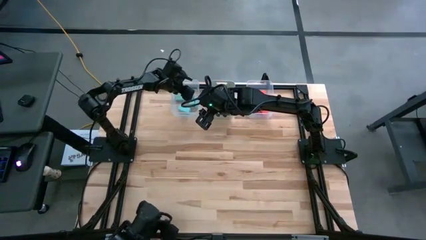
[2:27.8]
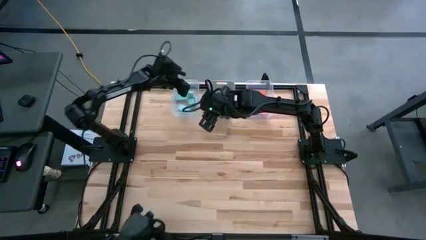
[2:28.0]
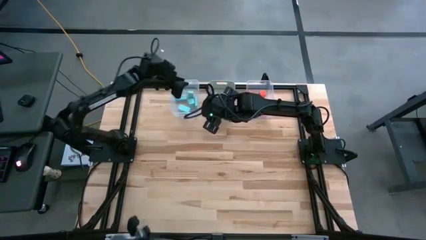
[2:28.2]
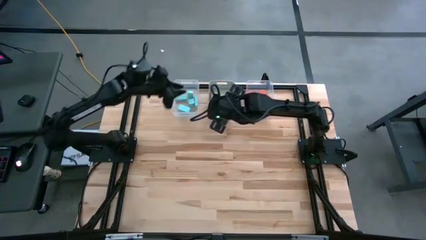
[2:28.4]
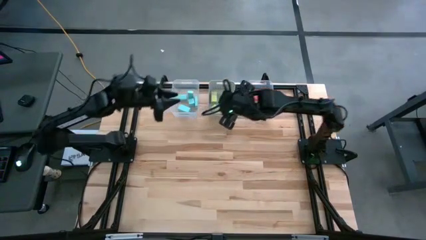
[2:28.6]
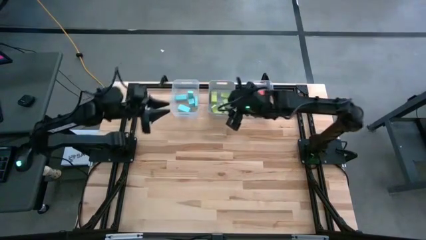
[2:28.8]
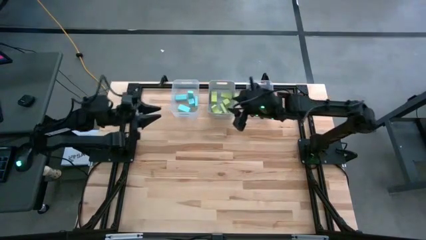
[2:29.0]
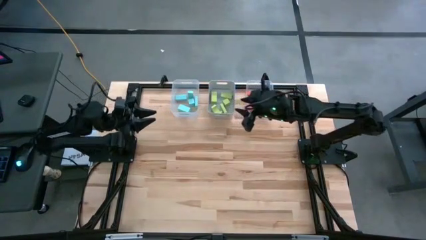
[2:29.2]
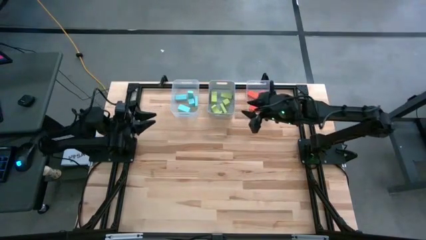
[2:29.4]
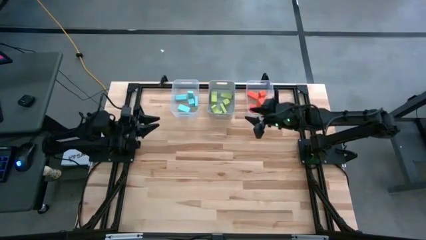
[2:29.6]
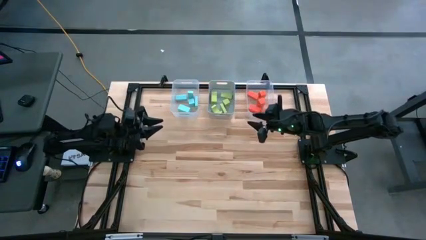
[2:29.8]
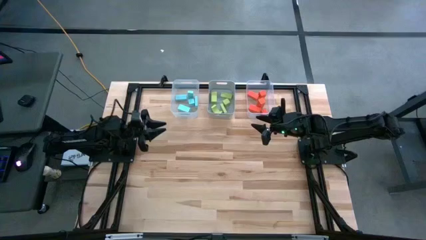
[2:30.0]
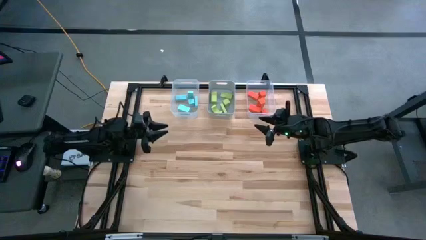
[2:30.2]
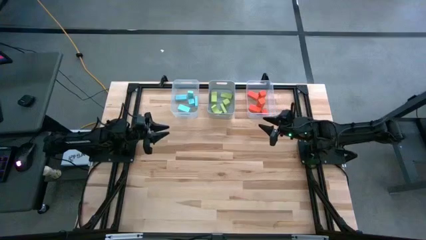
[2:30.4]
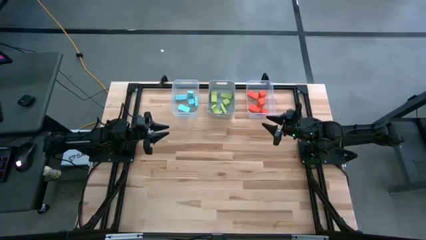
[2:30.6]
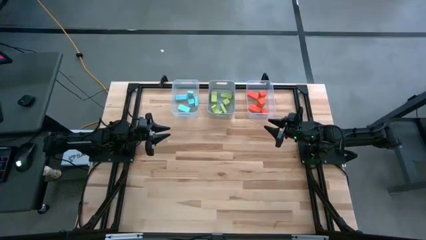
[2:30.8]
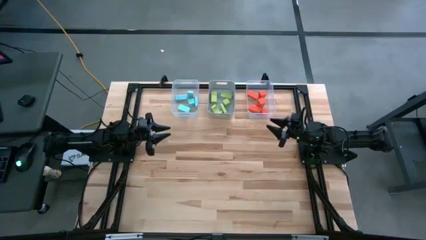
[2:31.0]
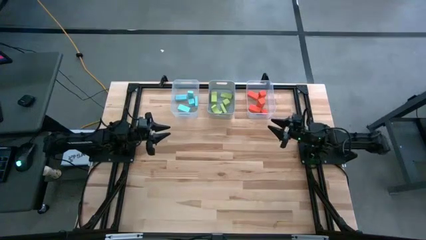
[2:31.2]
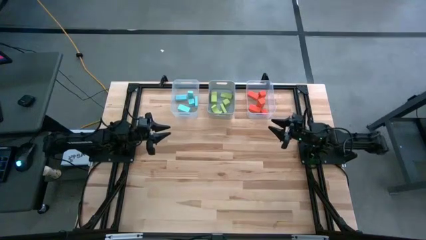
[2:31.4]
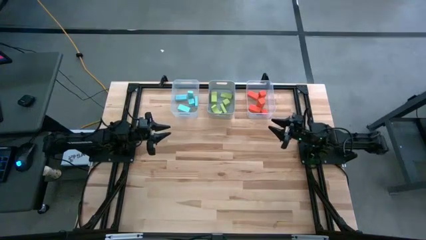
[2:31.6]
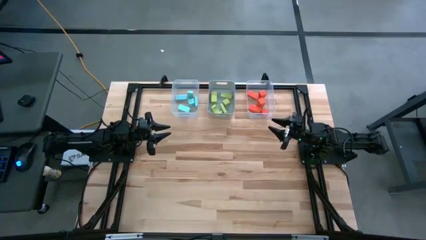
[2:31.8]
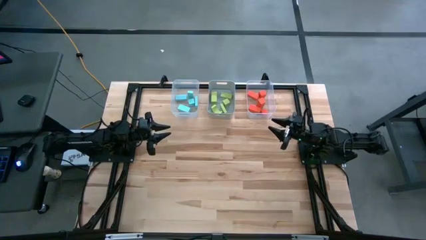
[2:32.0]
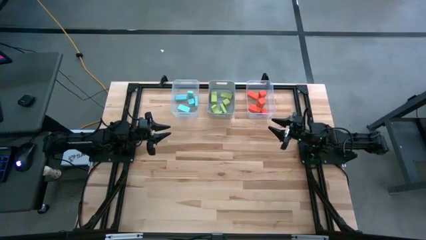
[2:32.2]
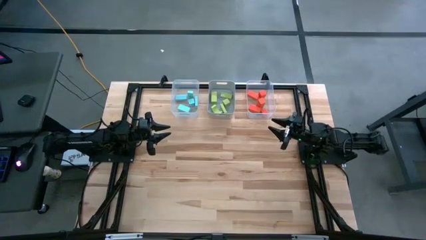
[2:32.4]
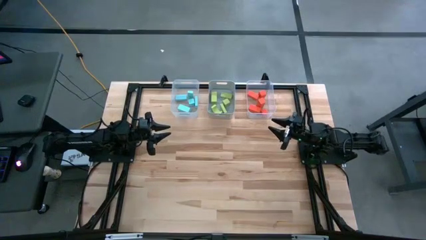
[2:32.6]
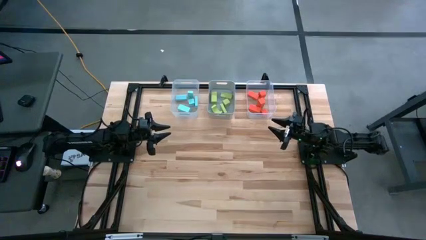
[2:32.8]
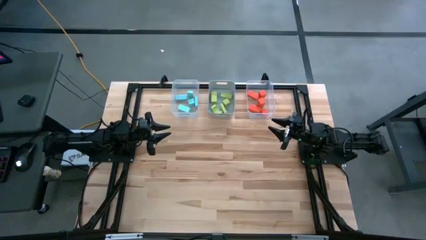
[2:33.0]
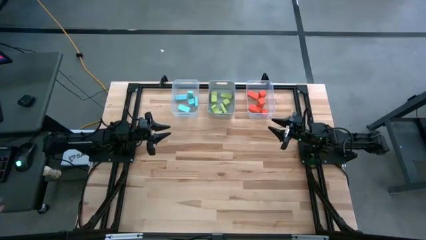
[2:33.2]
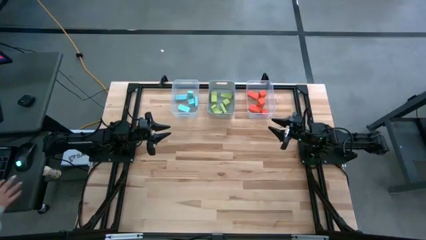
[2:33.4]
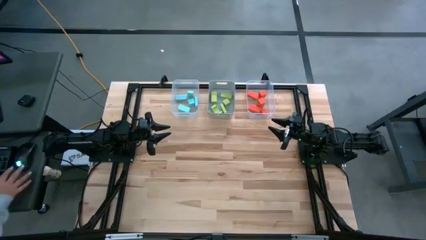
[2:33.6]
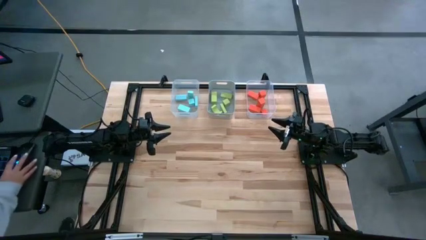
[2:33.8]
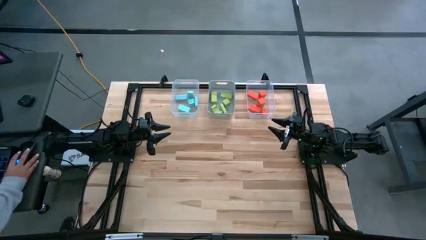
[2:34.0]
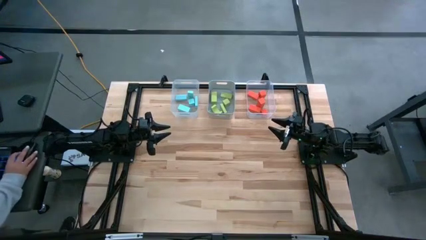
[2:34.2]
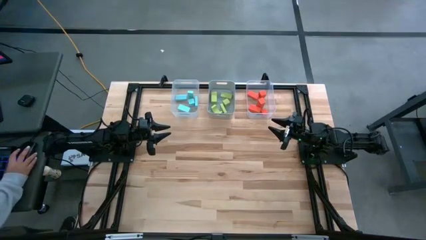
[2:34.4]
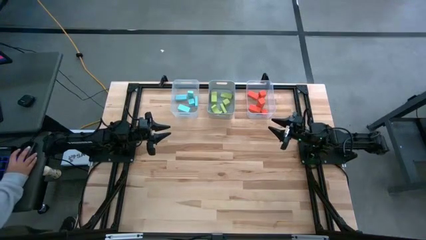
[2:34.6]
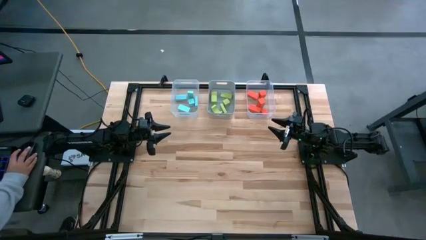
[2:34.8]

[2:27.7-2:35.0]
Task: Sort & place blocks by color
Return to Home Position

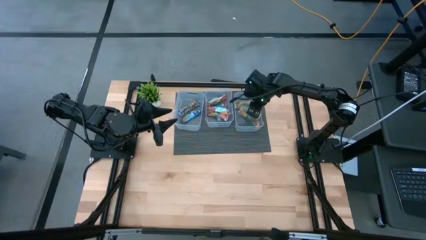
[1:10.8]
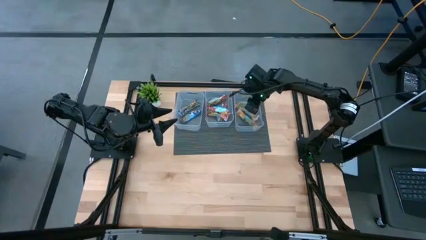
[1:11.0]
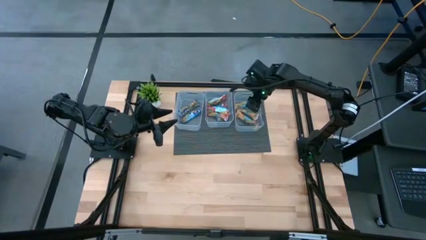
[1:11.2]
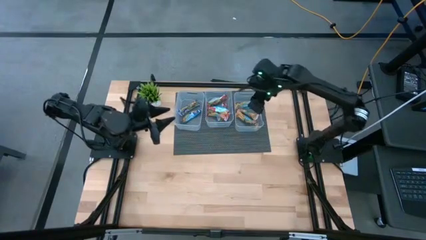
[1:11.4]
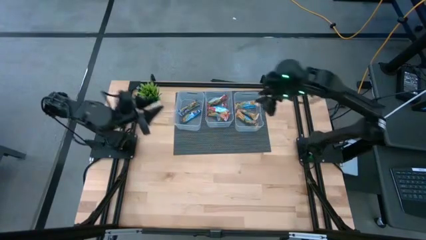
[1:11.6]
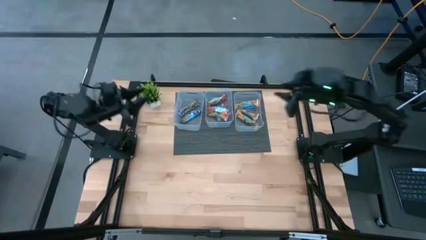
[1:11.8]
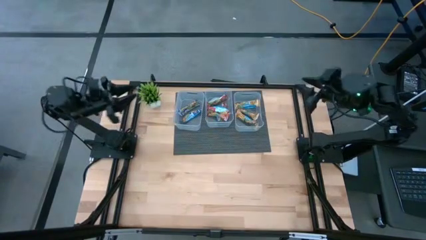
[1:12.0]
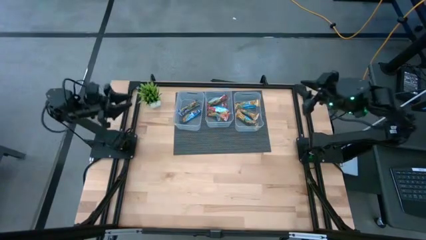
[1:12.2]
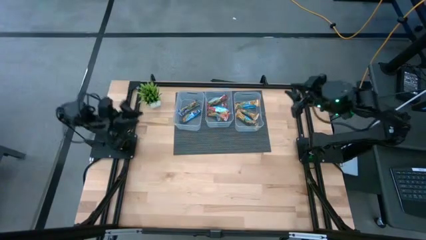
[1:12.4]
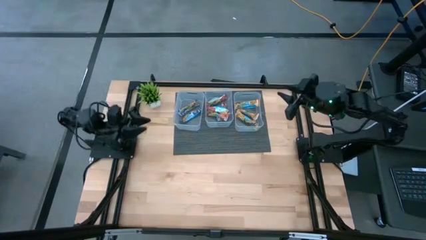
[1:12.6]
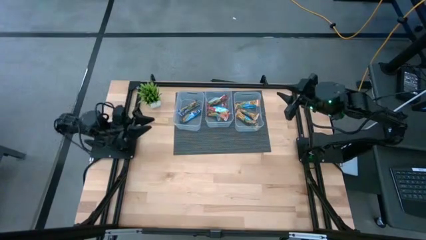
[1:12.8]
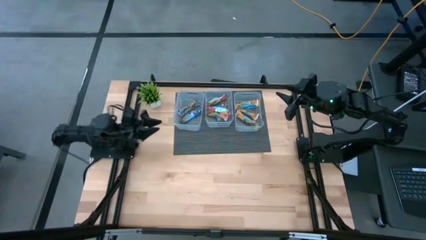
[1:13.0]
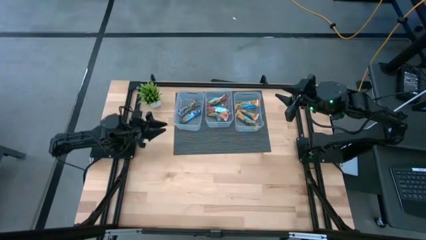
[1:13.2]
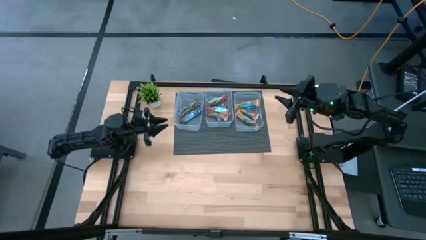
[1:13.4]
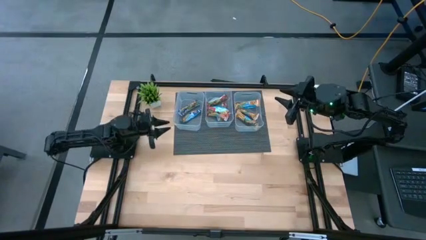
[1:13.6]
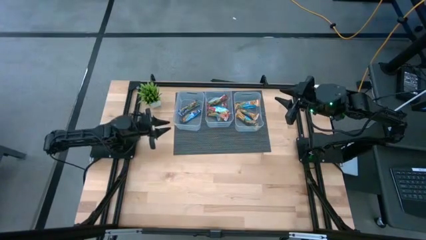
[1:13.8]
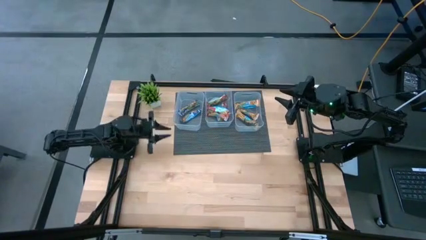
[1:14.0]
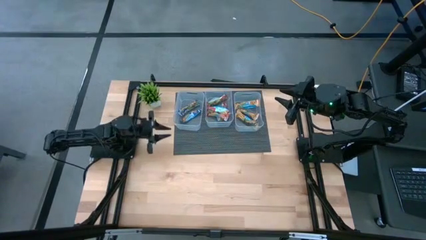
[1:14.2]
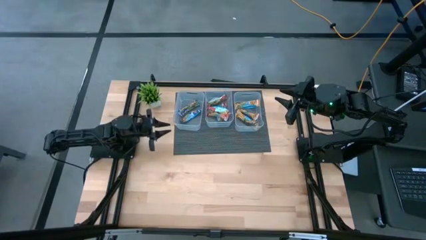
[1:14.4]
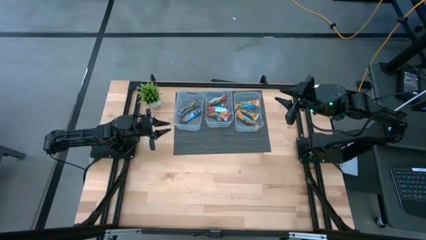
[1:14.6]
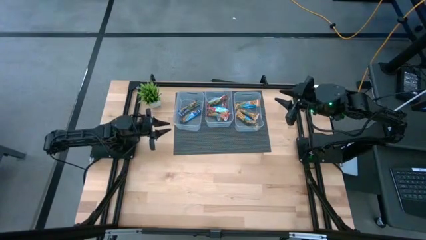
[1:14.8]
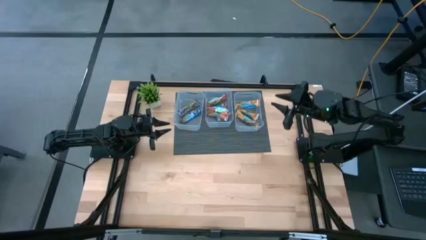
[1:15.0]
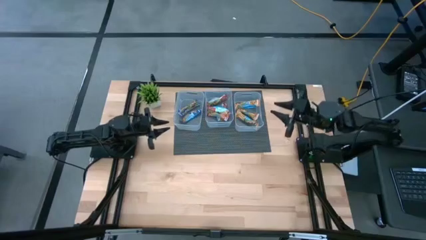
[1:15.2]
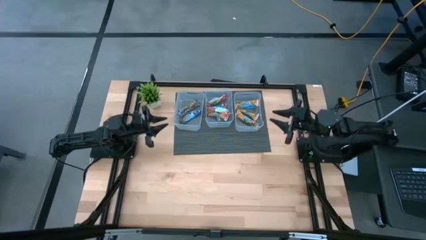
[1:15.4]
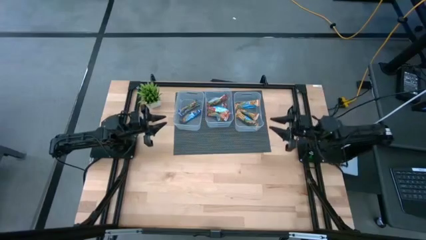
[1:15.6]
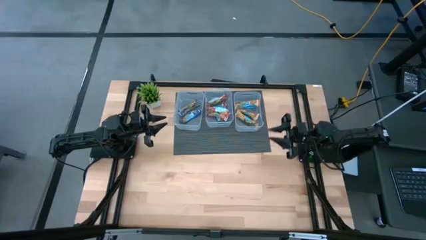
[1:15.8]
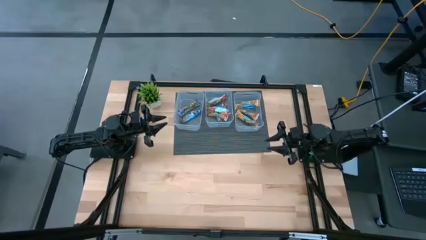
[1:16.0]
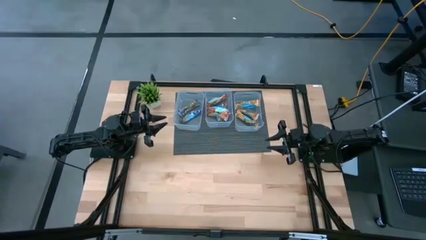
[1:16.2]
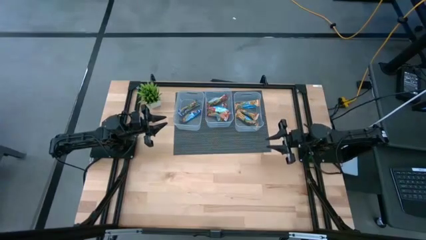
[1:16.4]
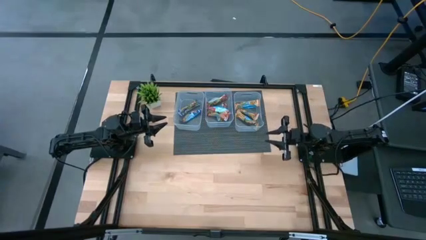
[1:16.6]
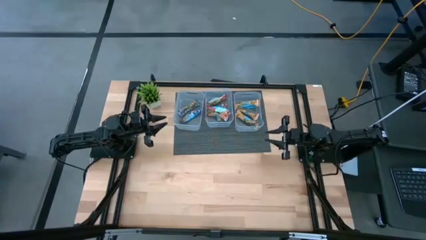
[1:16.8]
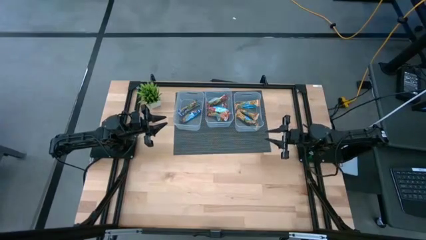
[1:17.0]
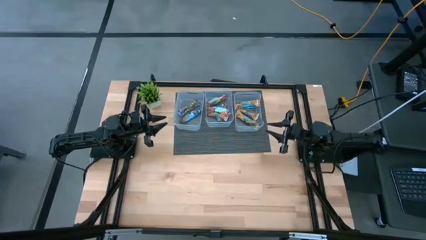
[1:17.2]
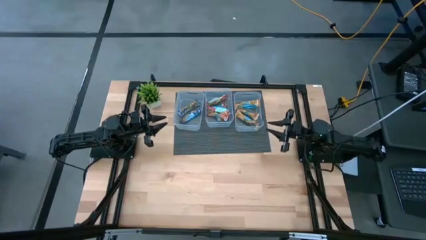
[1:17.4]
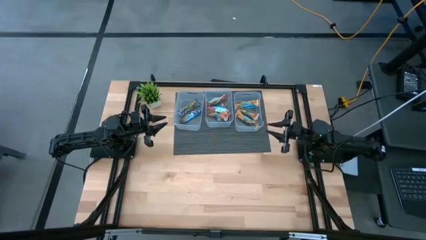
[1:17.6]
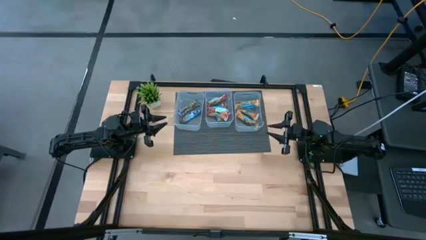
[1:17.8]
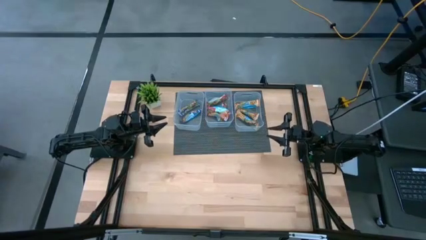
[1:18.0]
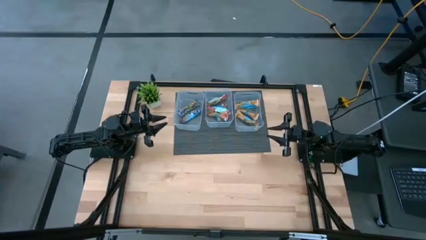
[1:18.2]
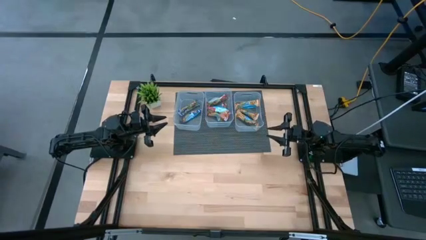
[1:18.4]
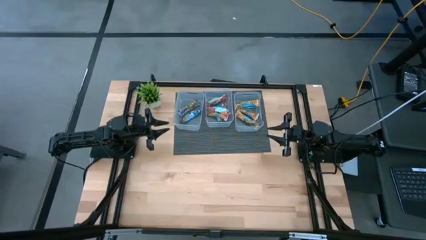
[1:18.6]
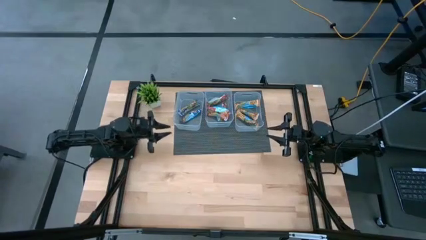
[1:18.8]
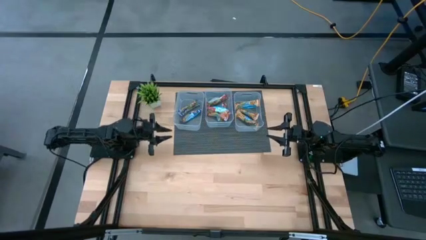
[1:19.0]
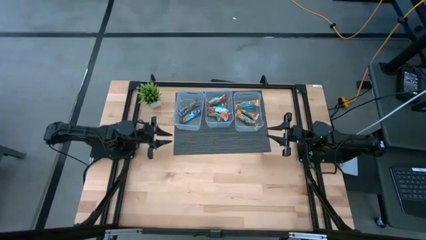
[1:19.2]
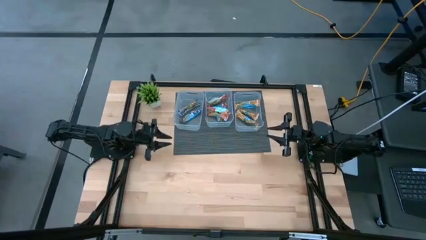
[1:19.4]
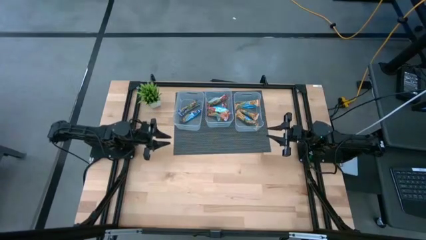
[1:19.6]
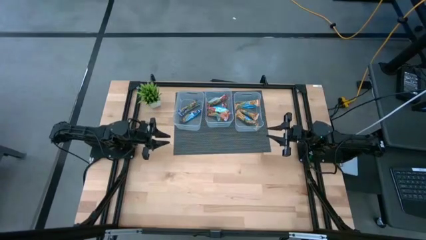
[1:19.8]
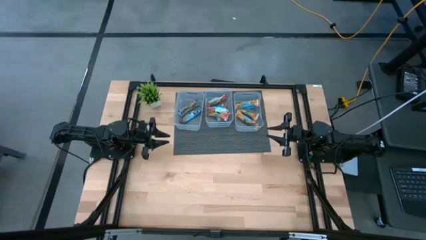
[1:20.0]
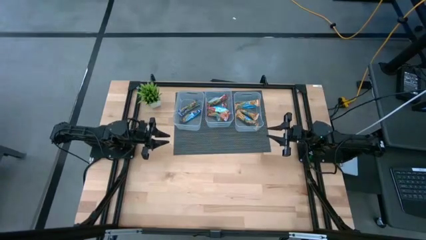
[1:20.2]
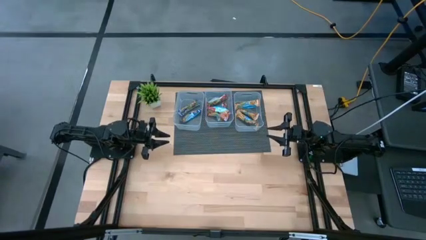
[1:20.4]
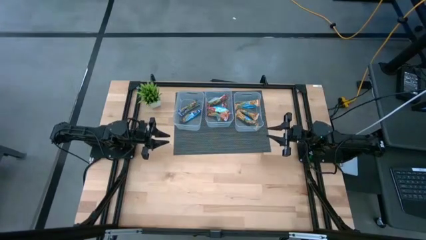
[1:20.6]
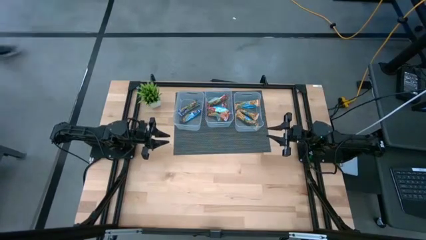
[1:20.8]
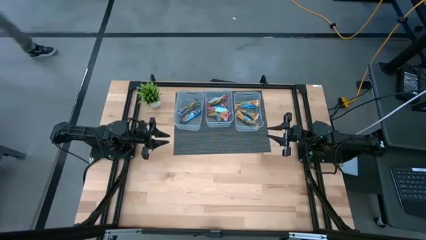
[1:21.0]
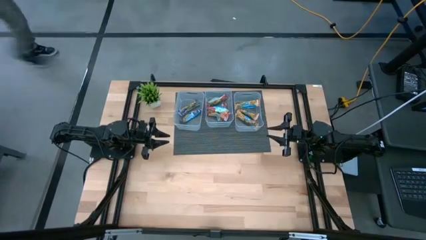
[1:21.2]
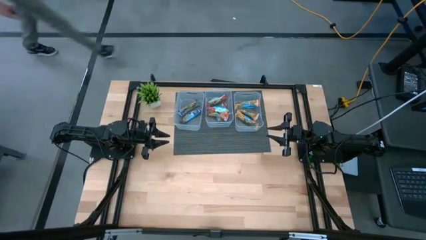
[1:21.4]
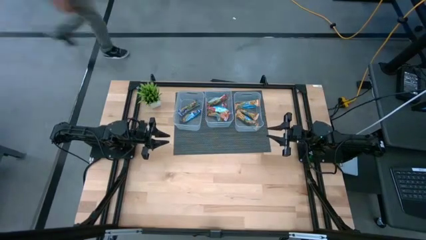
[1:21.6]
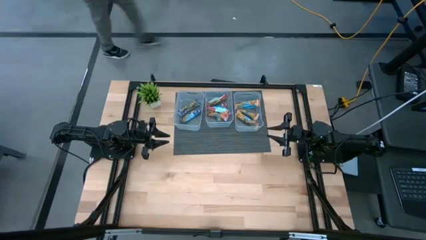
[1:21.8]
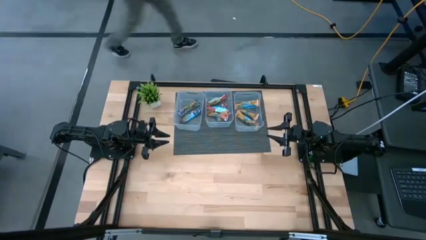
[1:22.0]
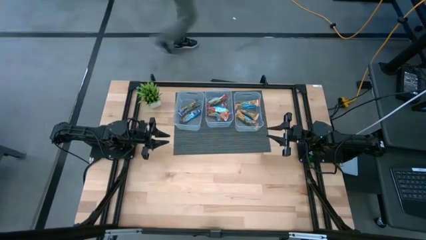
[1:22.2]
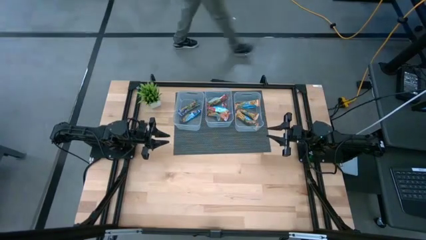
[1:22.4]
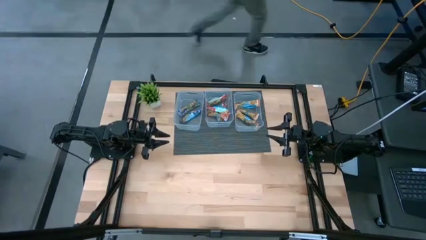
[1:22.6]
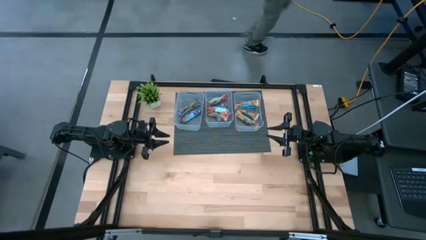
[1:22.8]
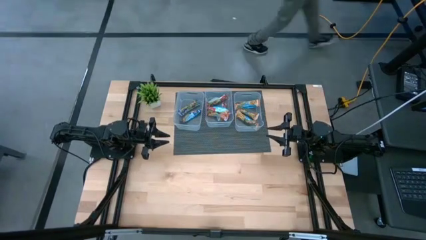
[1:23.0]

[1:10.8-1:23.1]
Task: Pick and place Granola Bars by type
Return to Home Position
